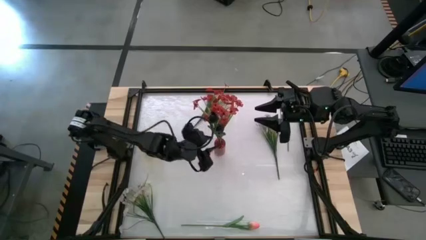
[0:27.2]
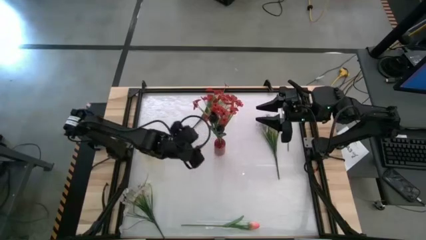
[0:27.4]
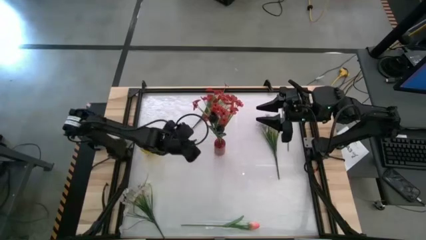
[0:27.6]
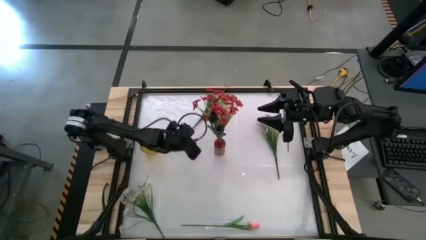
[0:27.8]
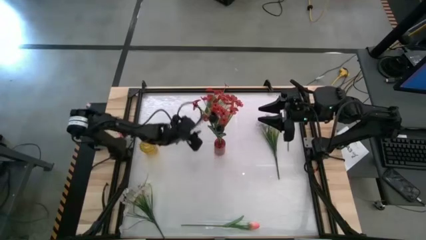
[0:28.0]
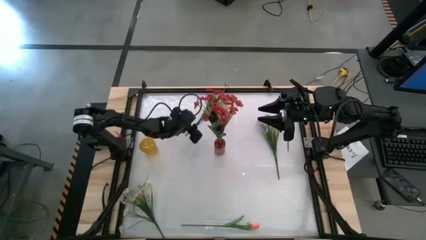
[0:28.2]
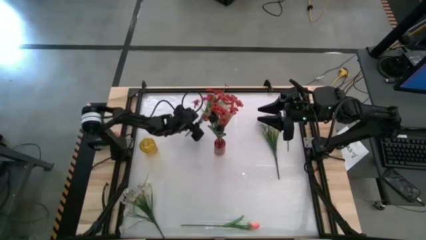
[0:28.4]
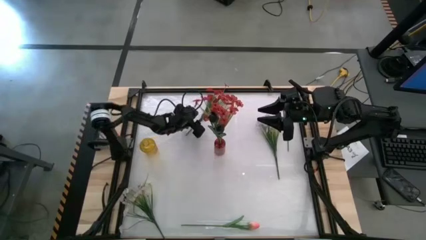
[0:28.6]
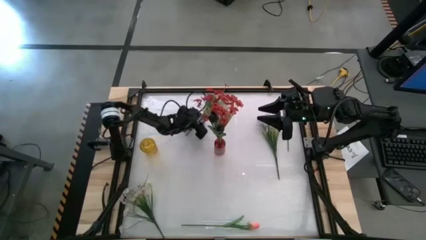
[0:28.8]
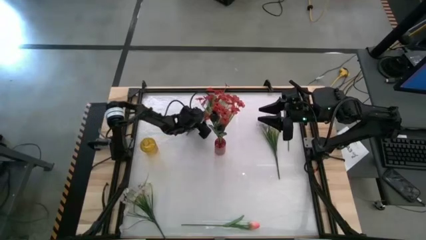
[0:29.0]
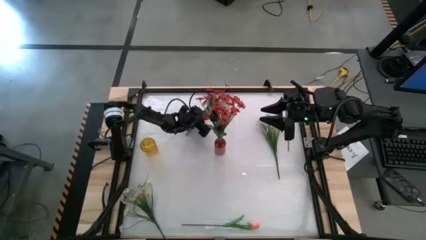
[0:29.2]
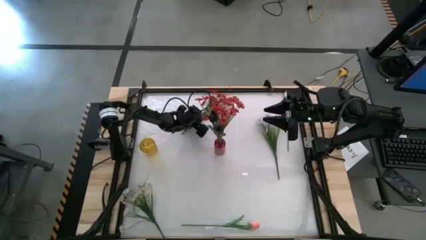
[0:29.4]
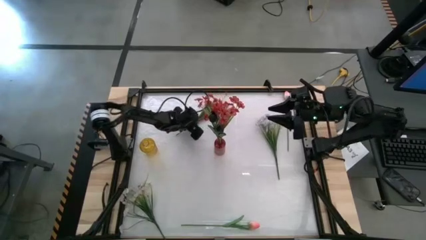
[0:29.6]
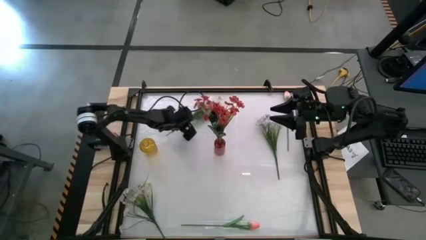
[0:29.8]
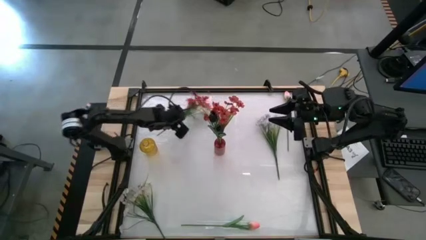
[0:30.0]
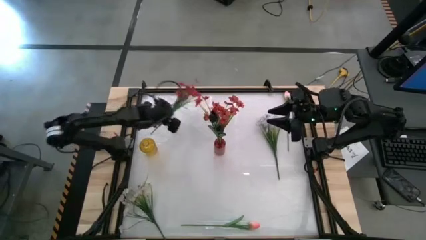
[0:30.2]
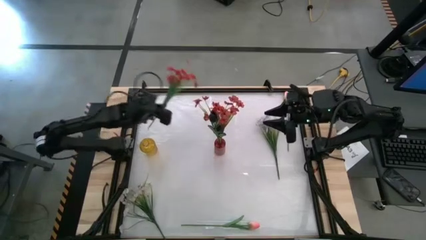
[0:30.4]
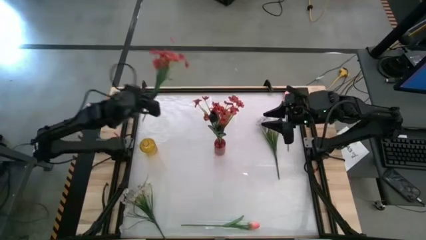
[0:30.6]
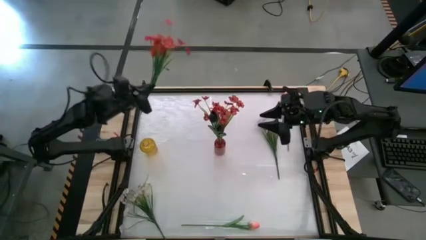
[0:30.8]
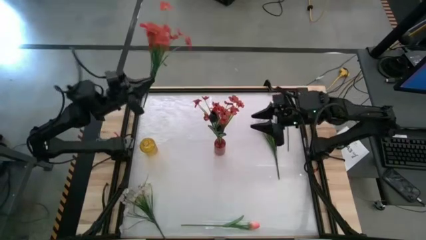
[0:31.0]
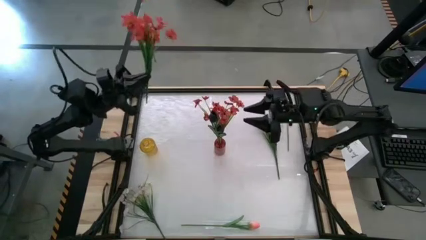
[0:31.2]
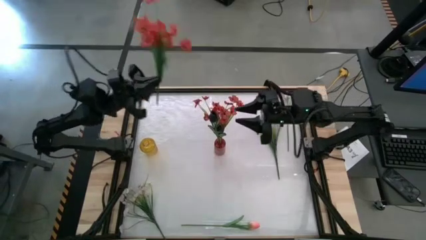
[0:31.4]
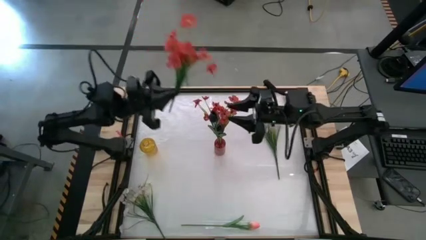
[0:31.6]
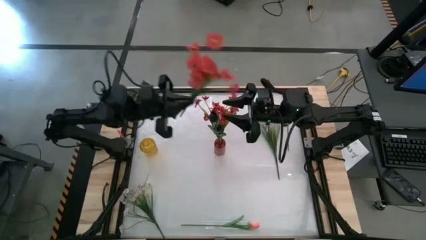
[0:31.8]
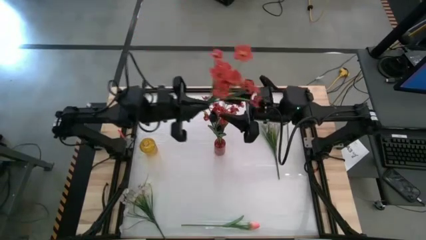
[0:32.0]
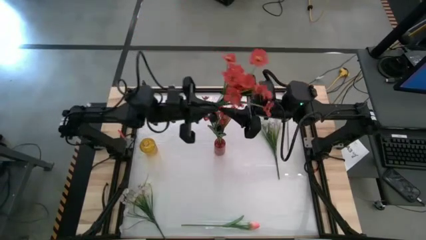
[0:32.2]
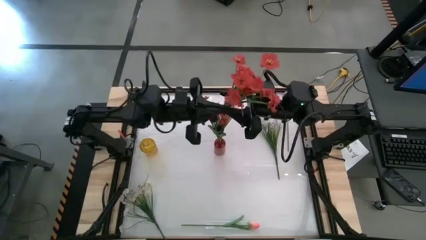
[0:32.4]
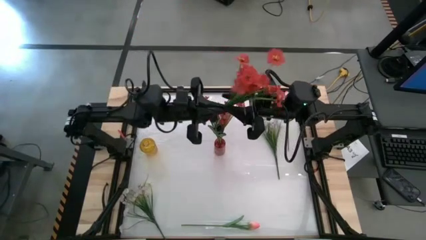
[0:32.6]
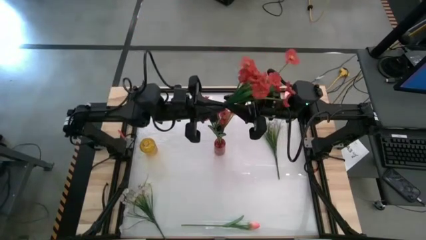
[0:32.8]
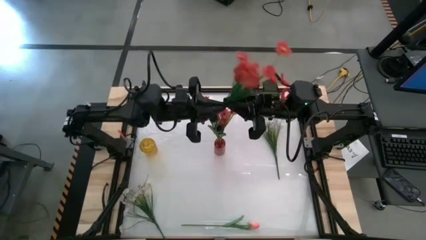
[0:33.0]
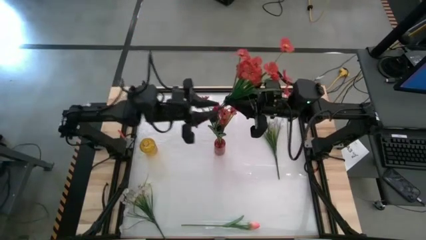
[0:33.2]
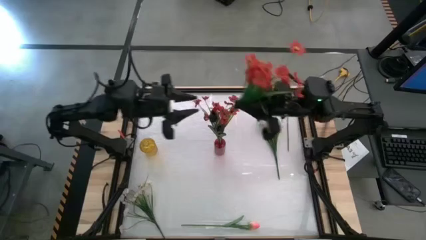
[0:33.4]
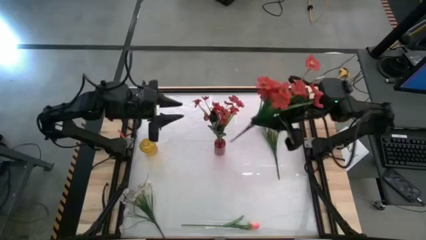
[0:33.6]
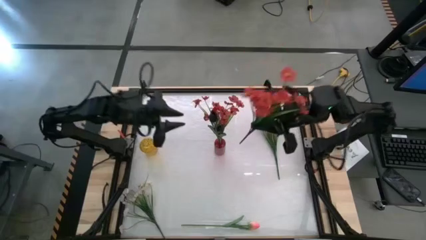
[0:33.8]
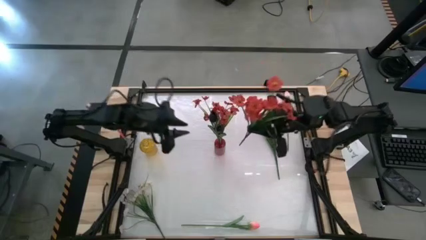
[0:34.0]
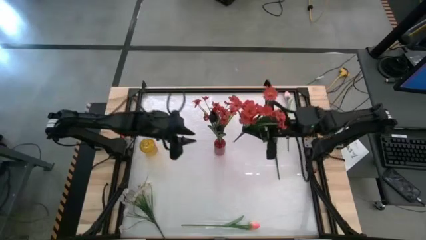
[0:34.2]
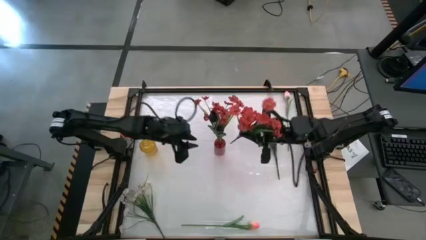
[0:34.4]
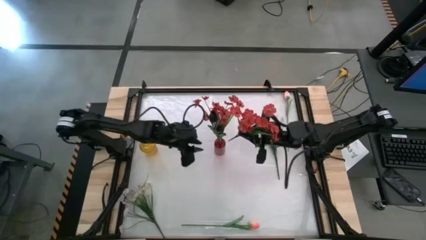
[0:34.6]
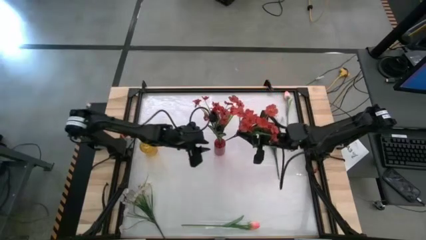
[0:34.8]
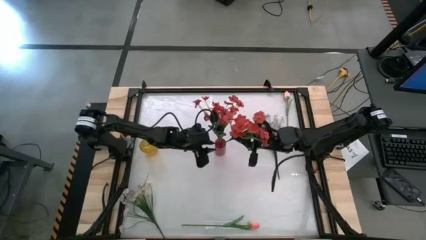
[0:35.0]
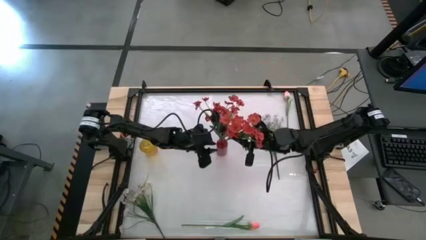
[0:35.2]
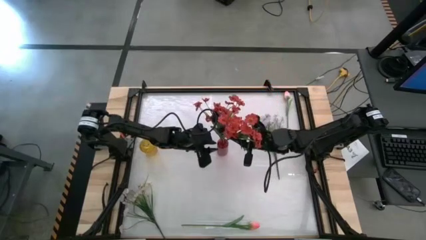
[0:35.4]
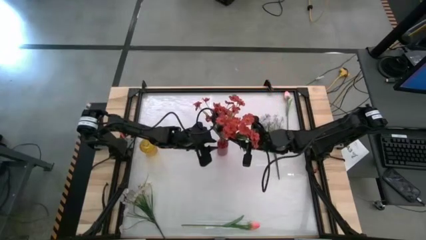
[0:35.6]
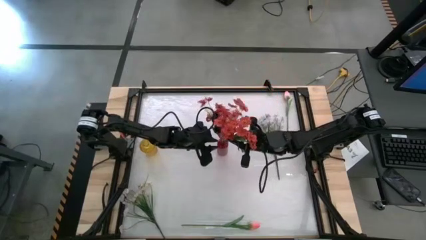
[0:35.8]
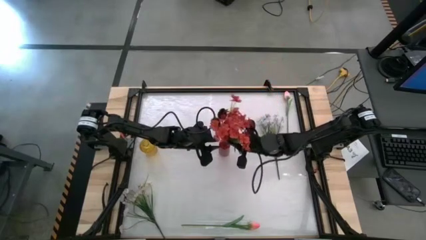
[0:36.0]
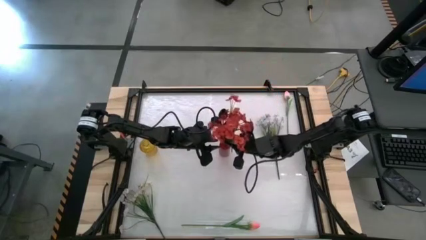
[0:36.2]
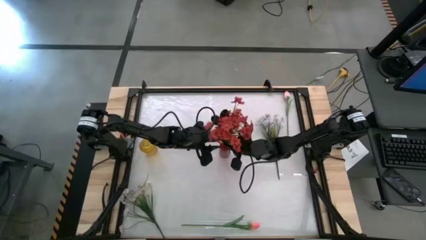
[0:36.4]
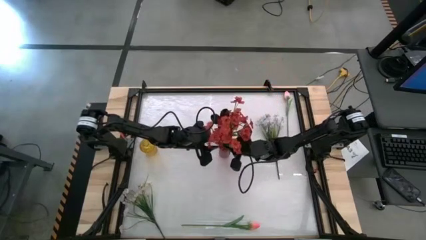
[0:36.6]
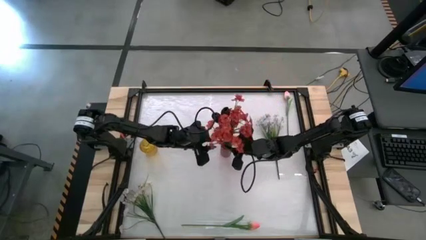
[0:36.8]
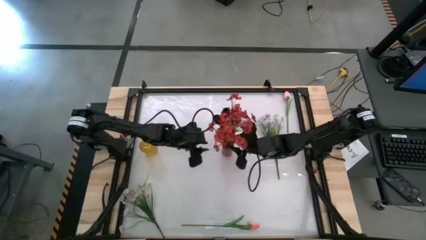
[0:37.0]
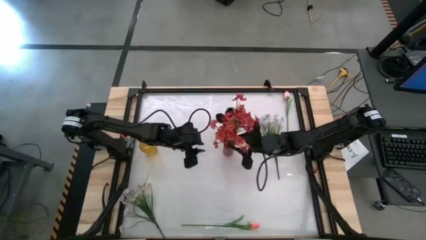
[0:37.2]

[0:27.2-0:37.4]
Task: Sort flowers into vase by color
Put the red flowers into the red vase

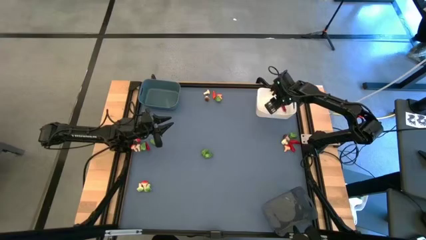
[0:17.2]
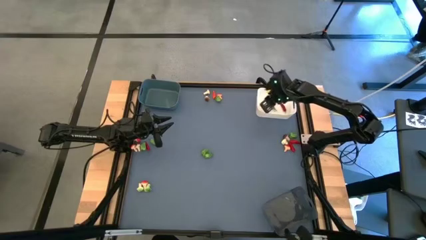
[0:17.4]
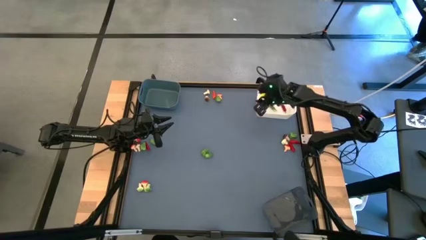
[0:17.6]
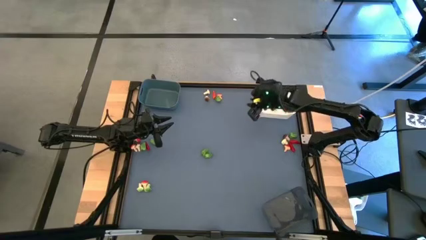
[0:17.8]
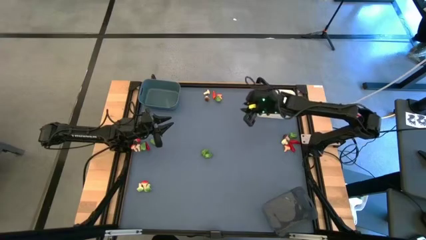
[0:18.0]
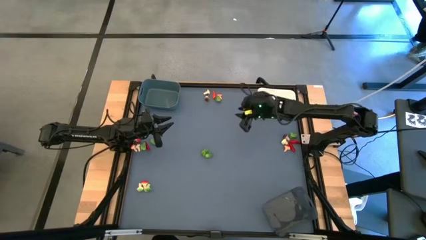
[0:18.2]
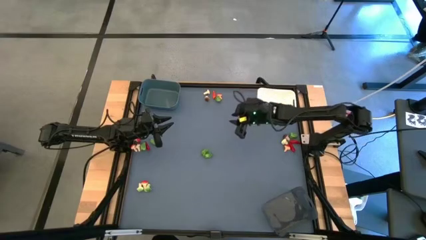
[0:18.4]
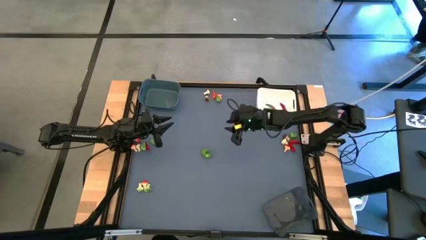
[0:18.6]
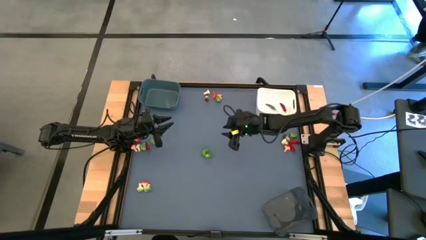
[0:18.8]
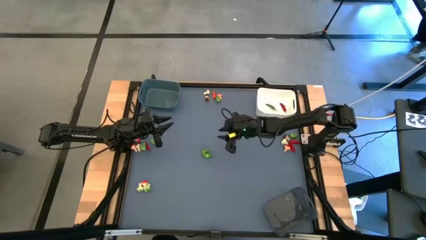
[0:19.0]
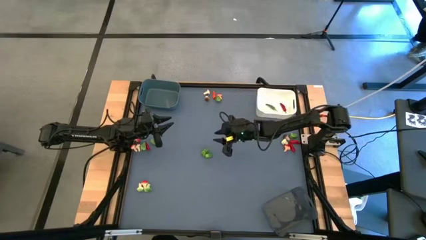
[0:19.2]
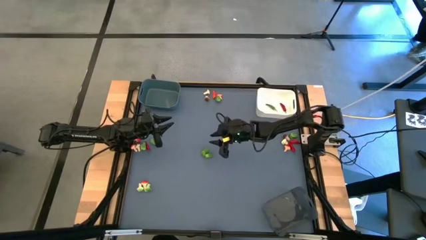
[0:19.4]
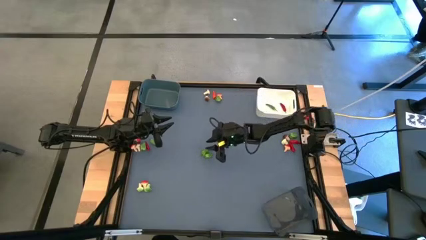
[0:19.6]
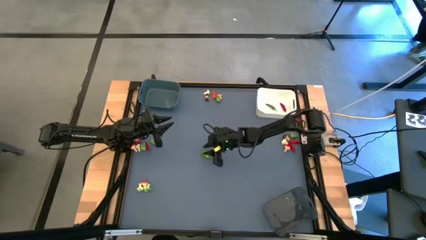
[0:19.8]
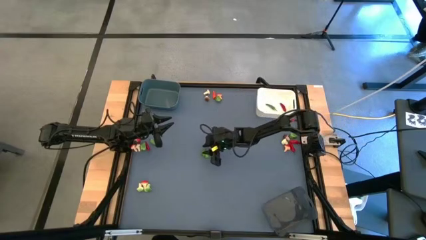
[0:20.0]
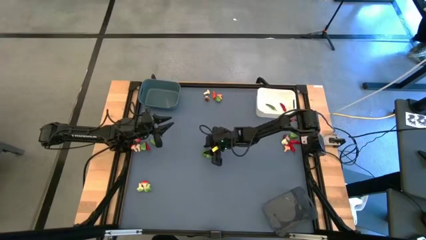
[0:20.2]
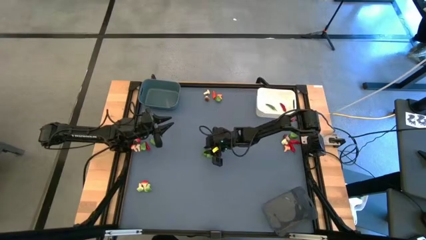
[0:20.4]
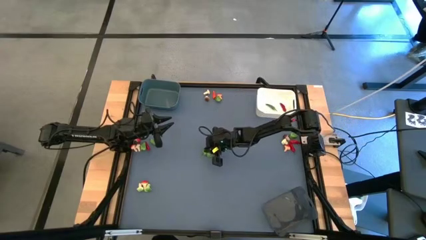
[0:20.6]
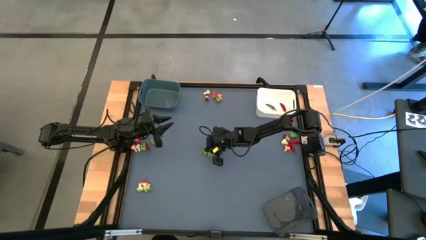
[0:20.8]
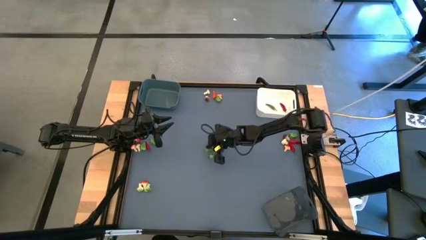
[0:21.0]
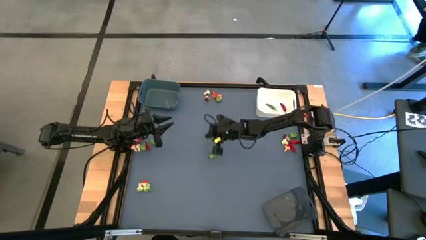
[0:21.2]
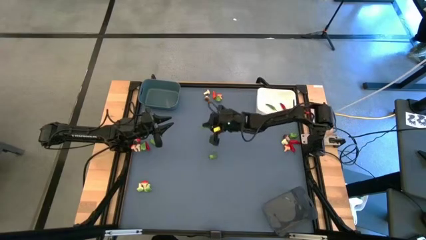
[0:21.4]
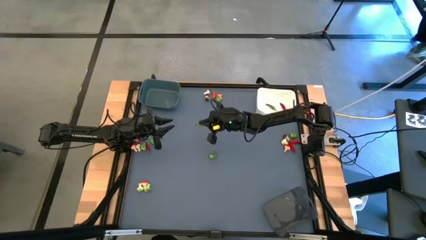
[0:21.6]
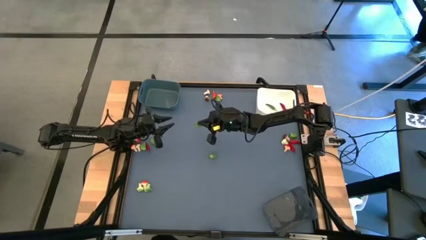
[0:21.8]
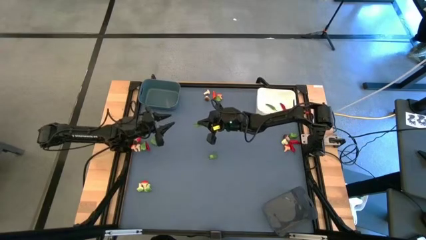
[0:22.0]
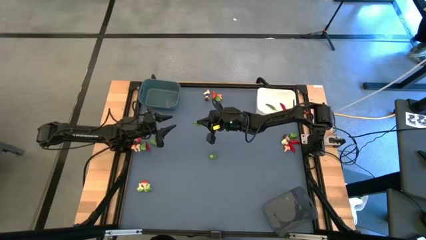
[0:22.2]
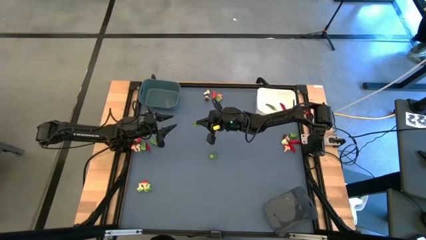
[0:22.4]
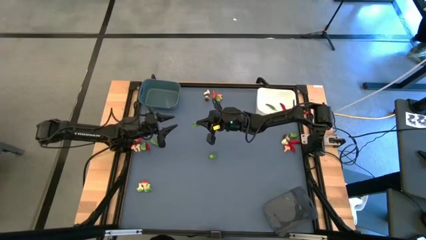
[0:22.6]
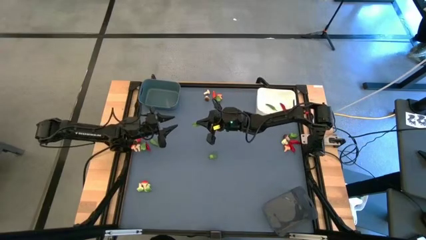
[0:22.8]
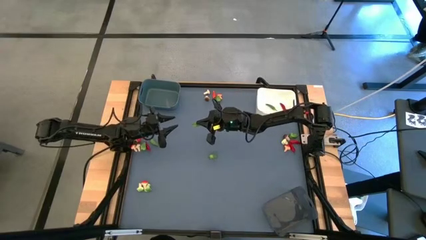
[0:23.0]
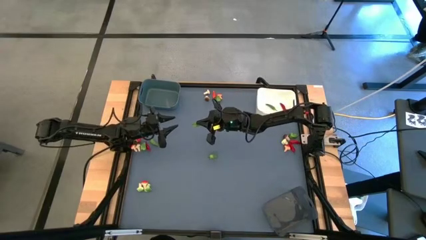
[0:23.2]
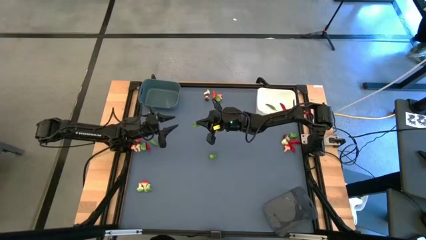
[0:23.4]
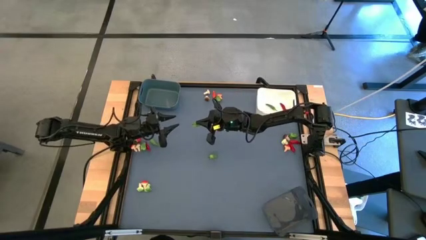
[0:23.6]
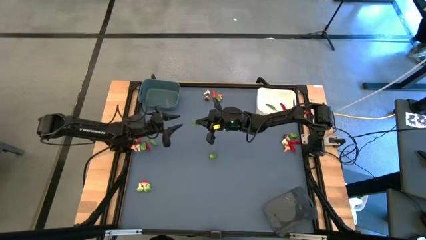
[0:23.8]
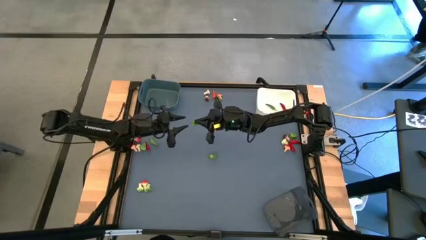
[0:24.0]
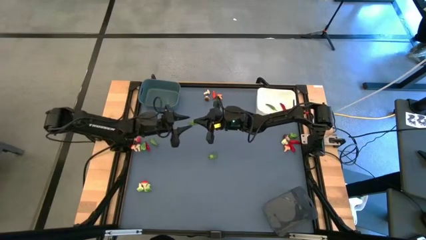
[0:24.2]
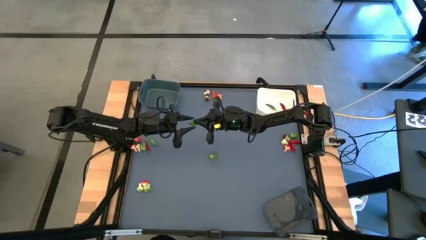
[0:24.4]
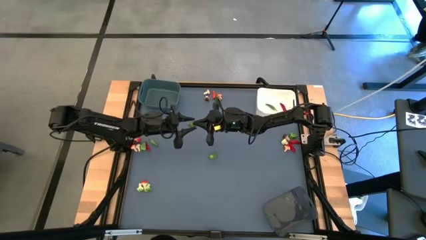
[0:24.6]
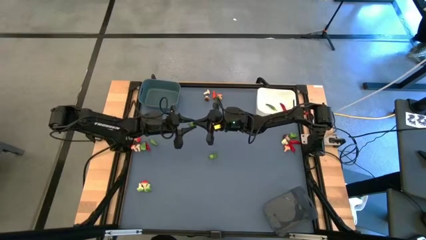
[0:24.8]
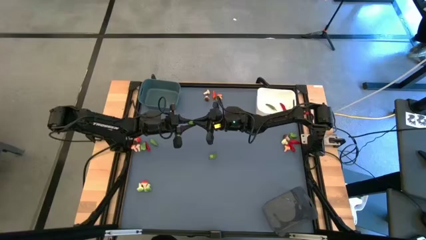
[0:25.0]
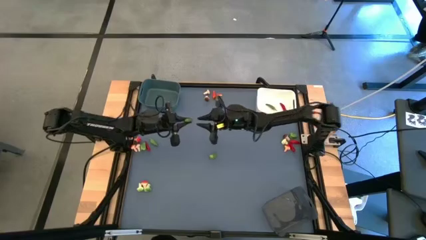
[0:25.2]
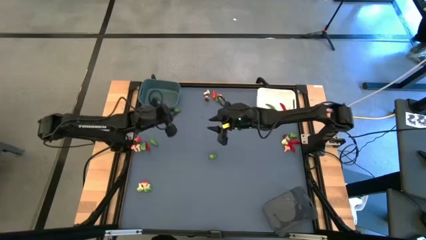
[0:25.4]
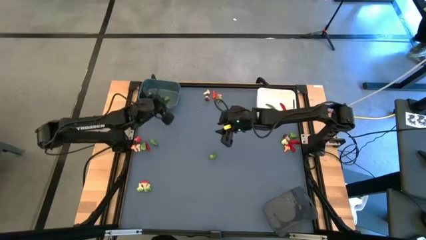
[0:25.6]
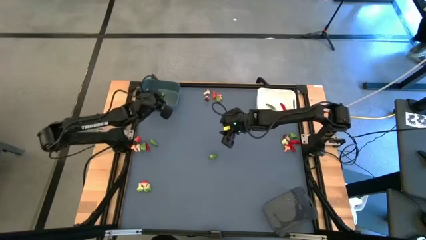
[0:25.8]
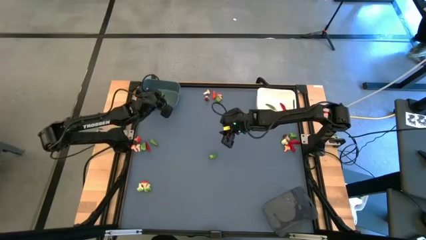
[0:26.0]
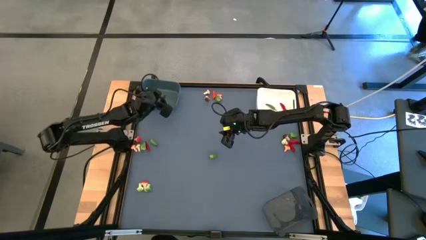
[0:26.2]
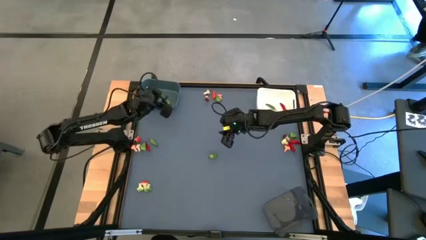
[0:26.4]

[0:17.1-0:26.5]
Task: Sort produce into baskets
Put the green bell pepper into the blue bin
